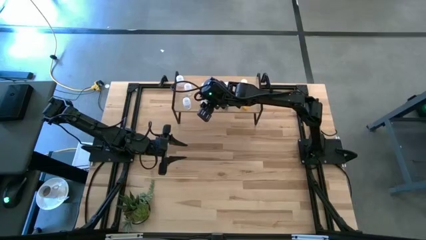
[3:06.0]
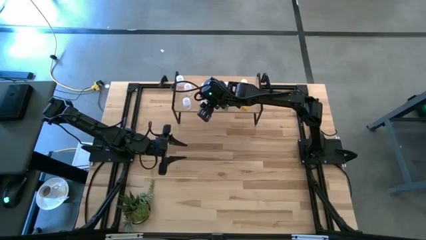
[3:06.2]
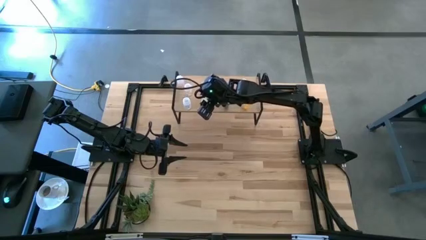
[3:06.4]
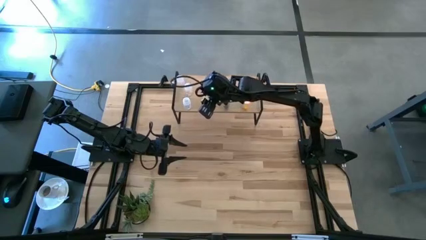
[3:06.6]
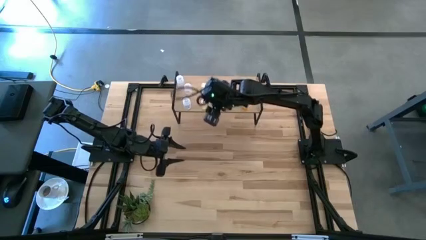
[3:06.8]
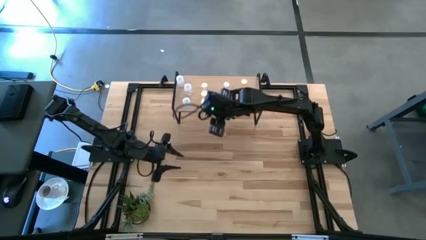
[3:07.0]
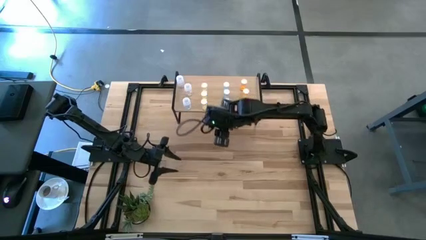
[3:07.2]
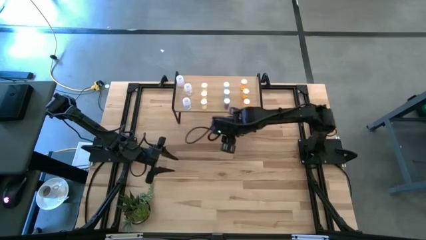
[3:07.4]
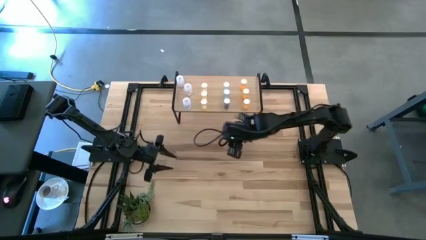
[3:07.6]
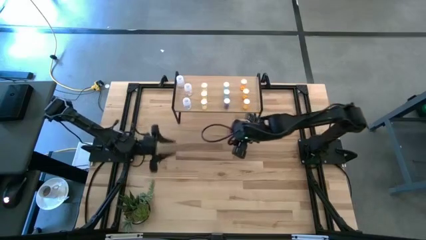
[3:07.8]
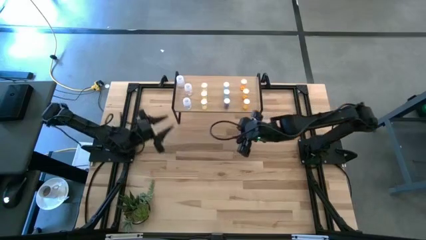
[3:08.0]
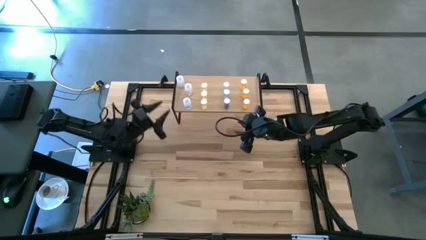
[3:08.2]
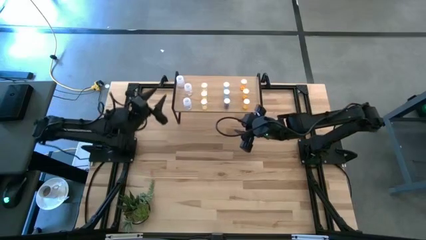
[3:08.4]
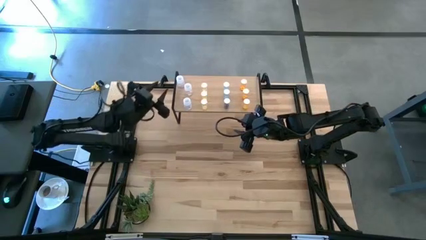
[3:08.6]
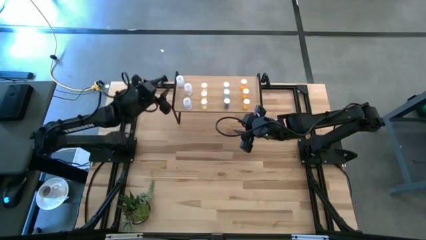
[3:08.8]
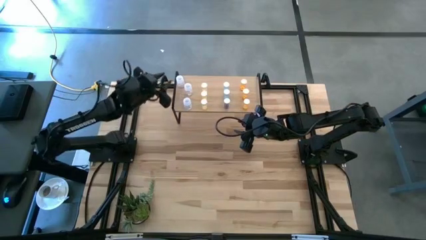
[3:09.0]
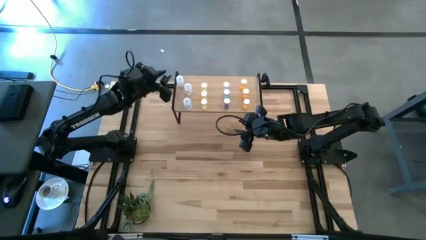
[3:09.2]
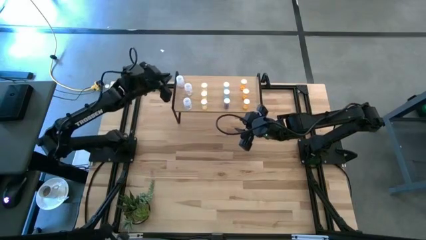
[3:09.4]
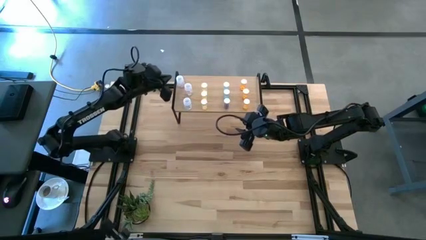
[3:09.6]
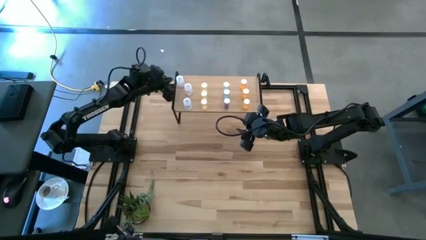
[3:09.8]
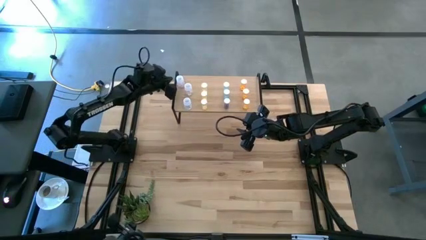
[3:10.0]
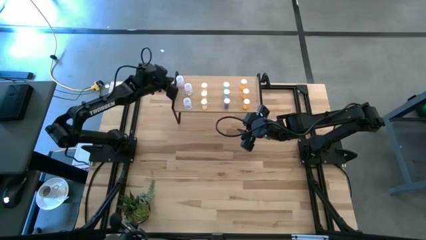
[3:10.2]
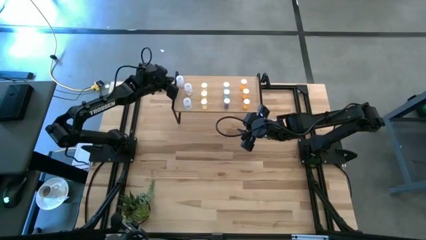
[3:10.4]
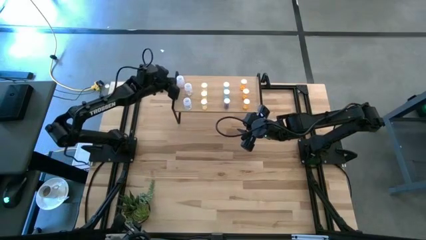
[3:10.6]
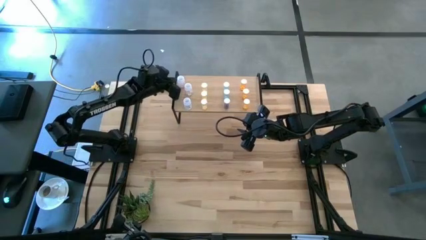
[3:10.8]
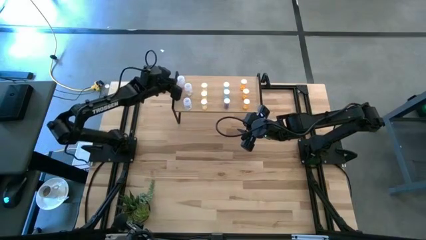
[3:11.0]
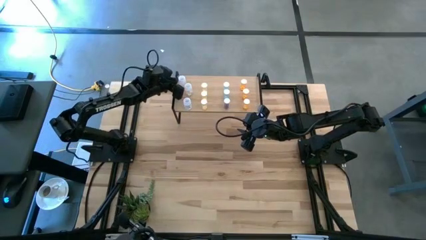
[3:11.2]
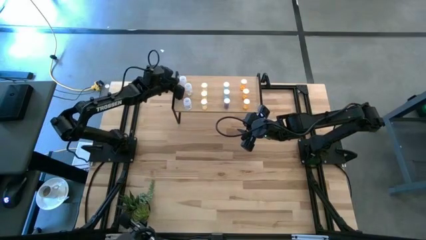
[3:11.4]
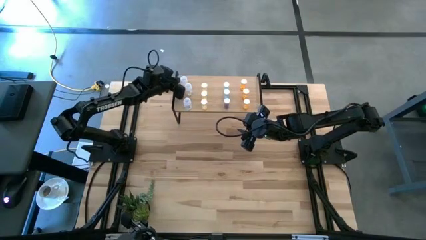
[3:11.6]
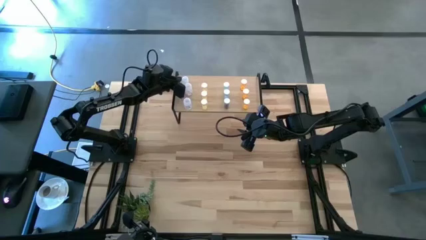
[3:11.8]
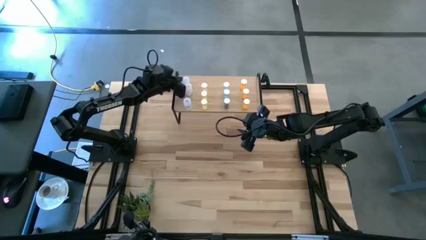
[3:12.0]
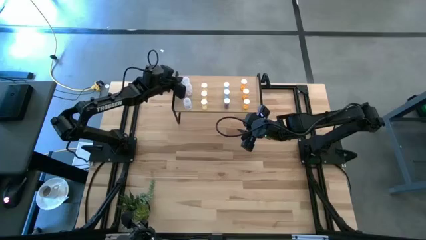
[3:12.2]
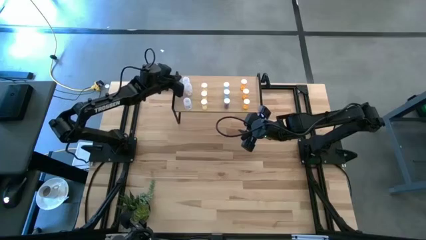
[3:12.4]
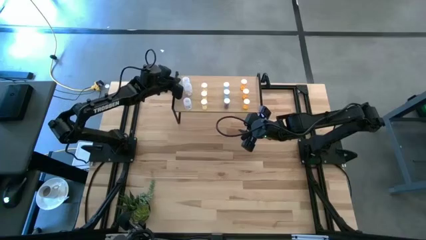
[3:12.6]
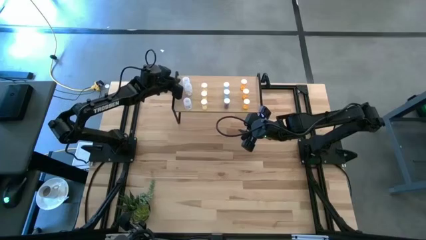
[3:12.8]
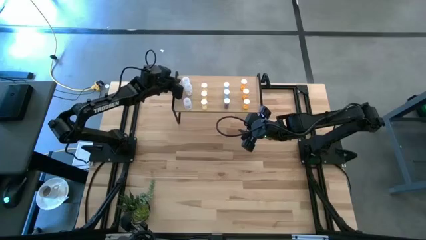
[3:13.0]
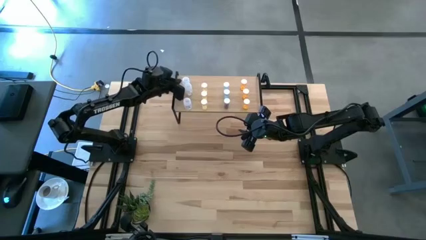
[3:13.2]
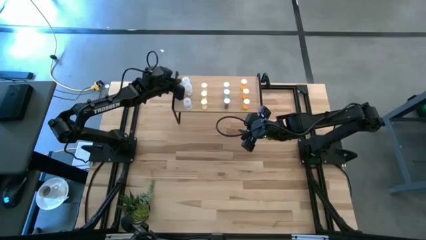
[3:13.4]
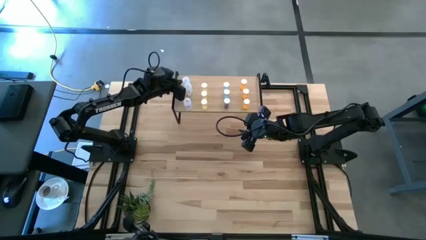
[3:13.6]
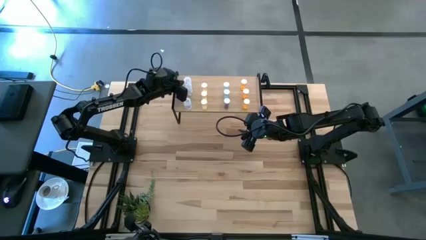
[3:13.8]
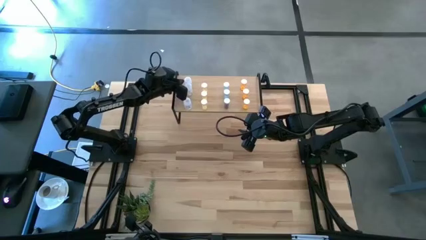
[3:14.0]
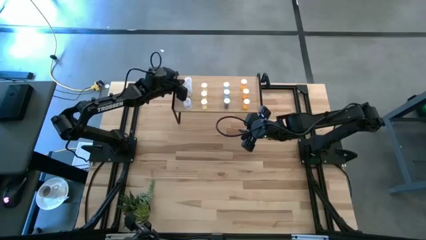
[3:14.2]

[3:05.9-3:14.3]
Task: Pick and place medicine bottles onto shelf by color
Adjust the transparent pill bottle on the shelf

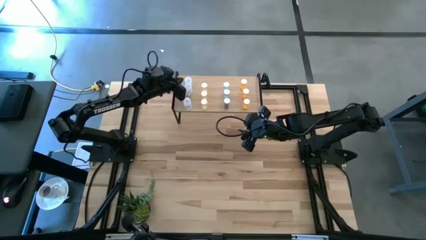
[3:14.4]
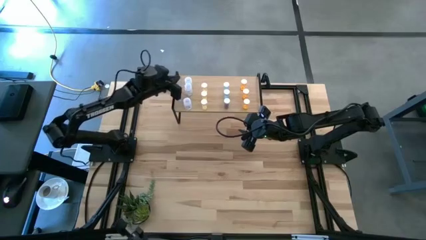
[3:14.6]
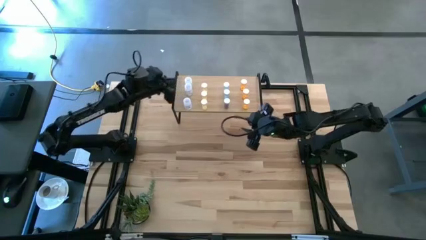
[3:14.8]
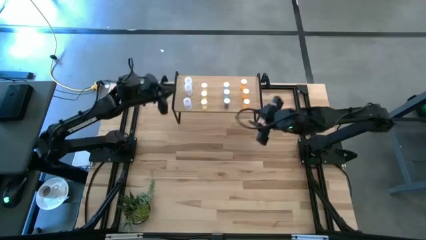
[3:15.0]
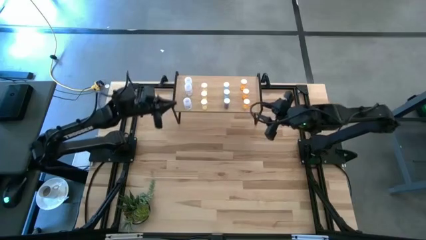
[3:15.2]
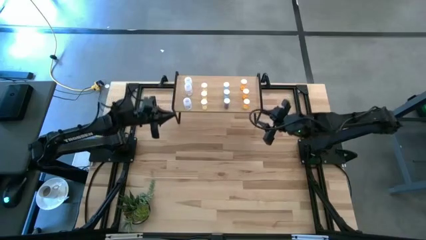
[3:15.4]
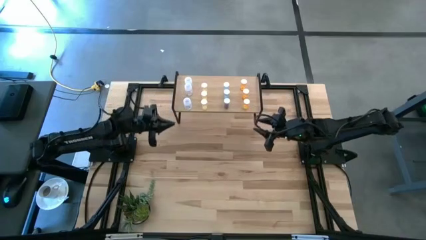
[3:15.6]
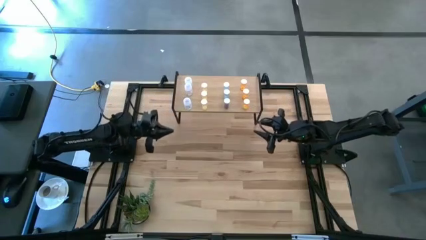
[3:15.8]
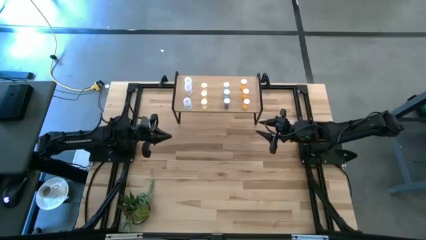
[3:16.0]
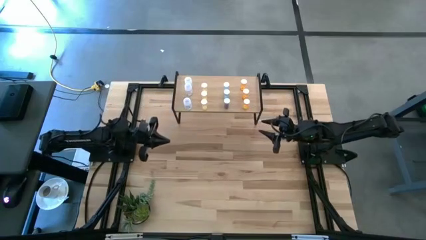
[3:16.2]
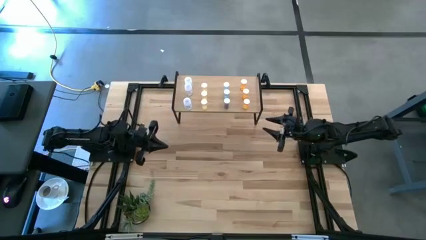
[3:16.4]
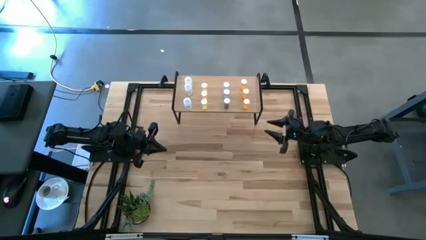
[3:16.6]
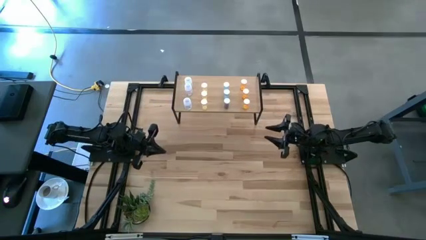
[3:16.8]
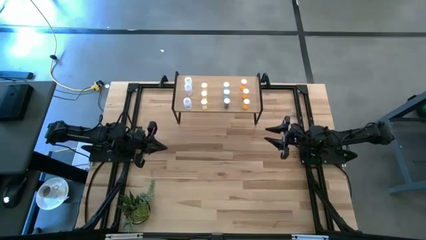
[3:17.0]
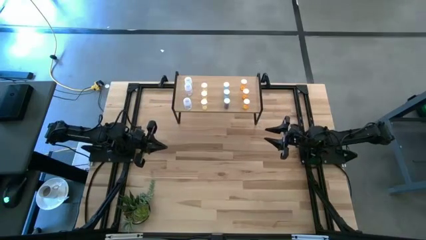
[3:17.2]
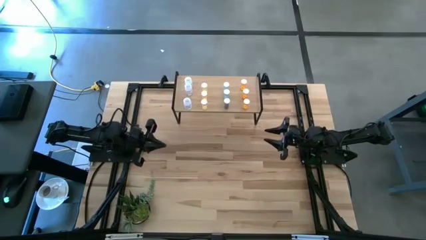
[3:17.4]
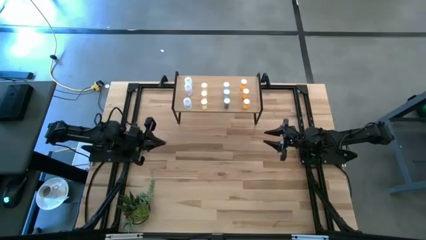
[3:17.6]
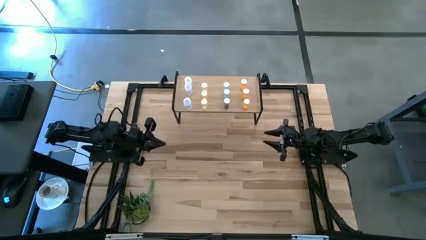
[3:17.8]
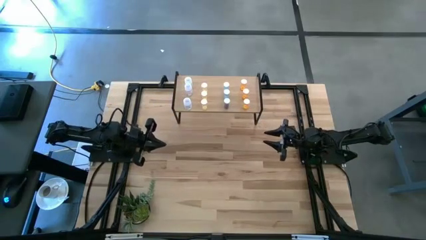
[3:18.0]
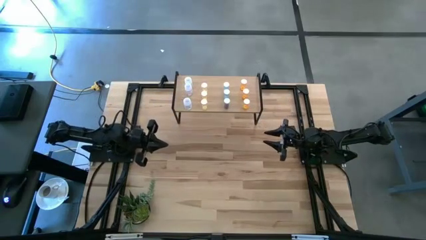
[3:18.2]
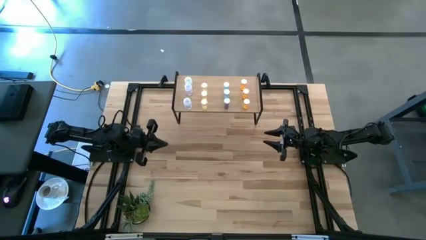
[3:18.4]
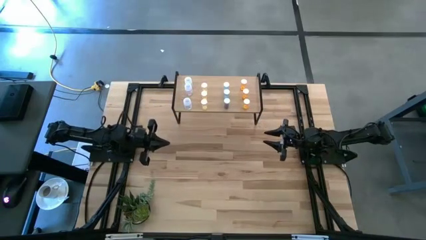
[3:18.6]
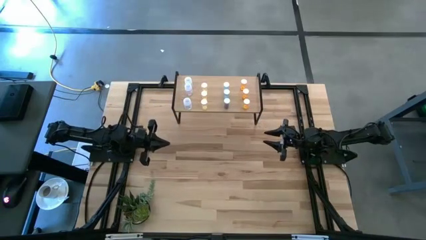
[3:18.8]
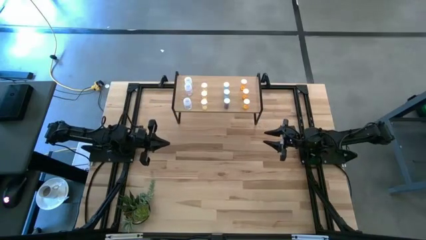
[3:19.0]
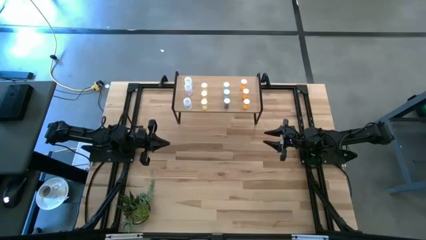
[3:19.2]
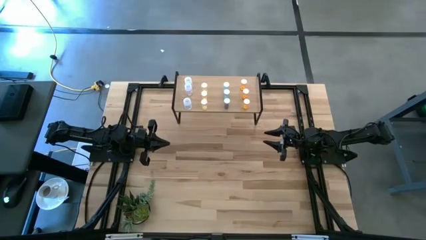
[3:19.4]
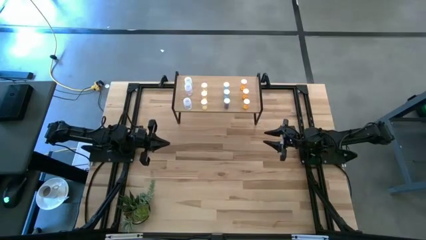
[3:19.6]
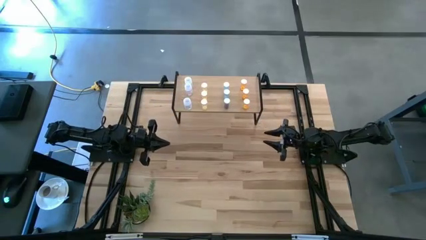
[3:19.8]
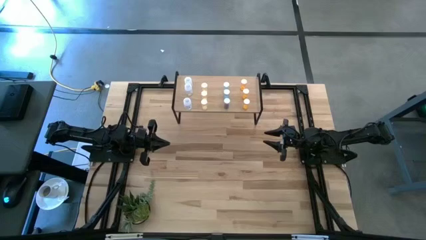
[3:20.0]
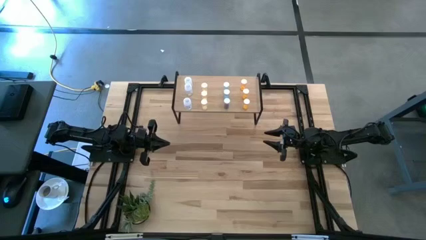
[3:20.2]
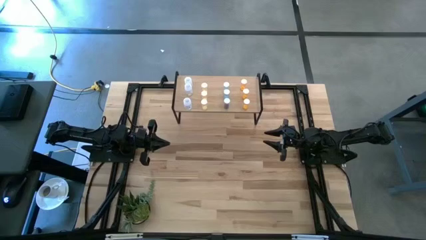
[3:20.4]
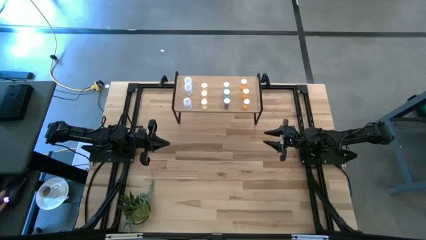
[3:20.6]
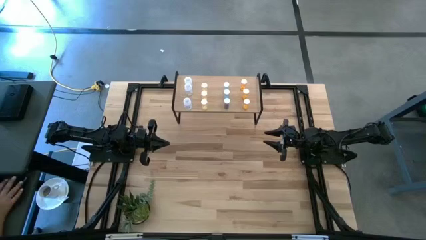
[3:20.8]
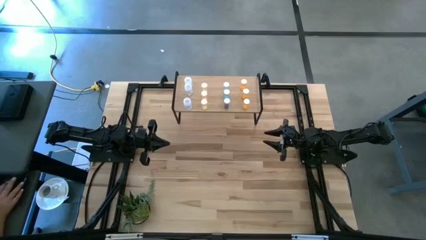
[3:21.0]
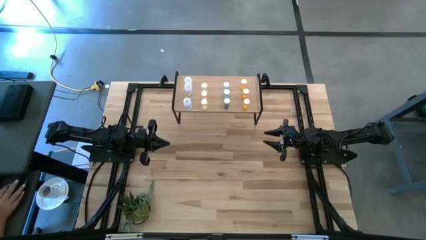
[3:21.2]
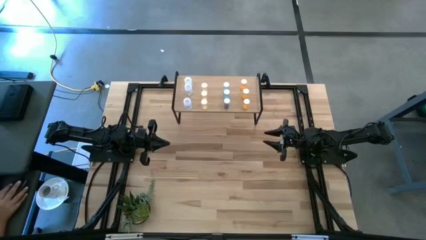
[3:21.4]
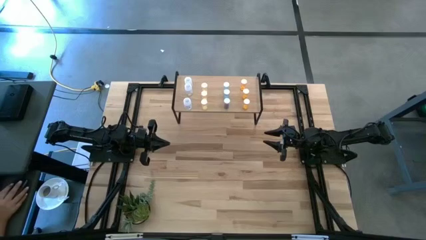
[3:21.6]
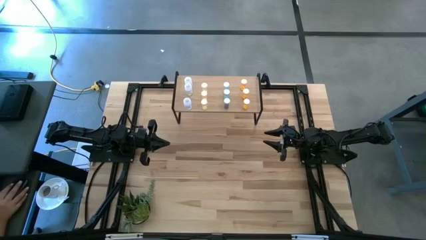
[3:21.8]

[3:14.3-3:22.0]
Return to Home Position

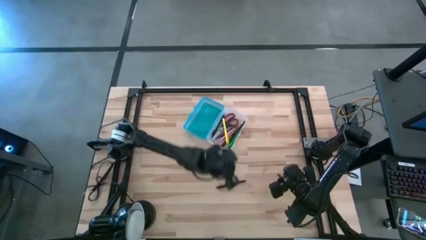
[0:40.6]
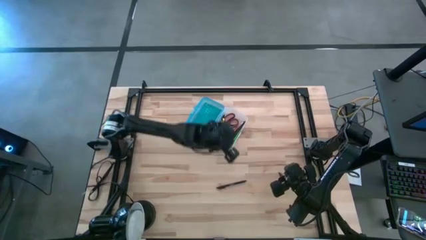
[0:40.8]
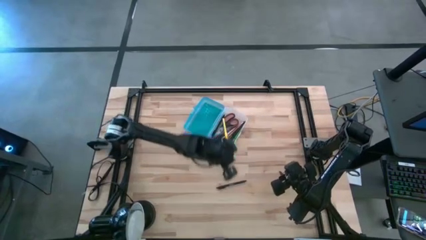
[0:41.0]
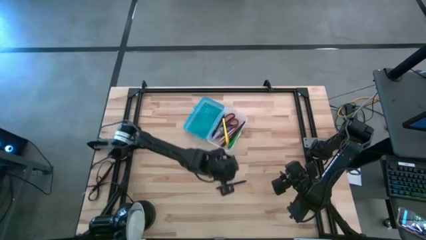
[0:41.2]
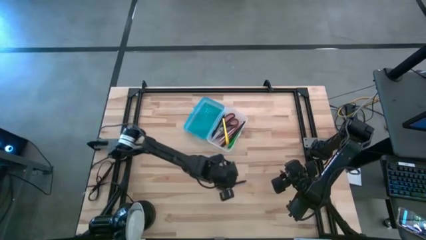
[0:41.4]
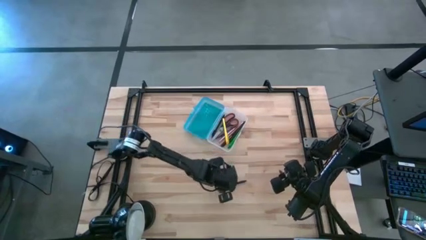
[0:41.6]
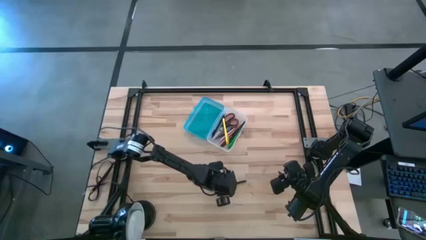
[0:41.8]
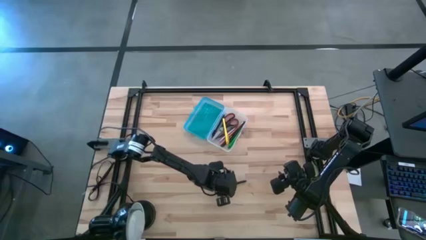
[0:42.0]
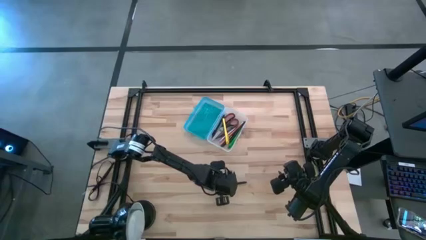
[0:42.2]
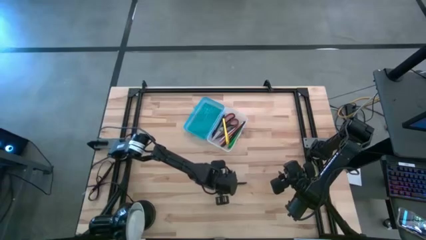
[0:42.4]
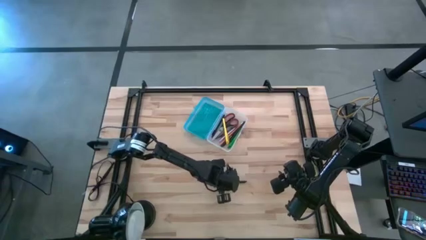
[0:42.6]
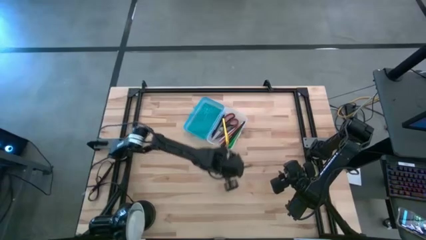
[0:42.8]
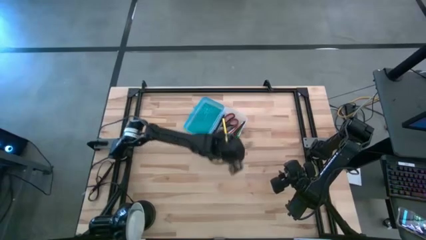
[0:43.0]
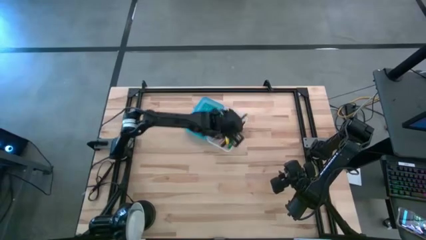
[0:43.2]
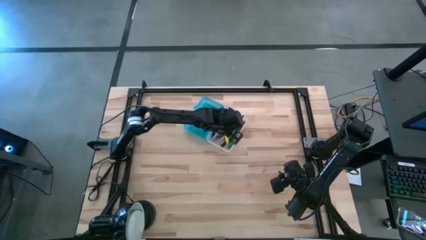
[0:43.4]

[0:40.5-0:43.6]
Task: Pick & place school supplies into a supply box
Put the black pen into the blue supply box
